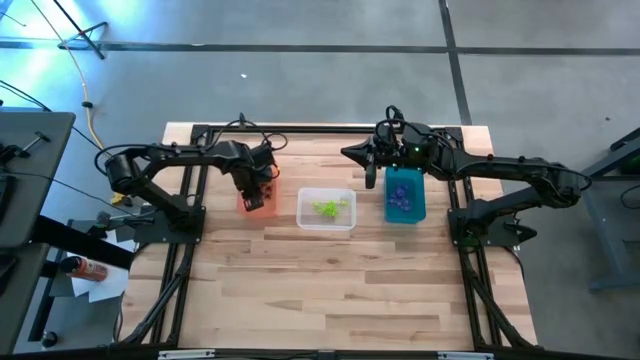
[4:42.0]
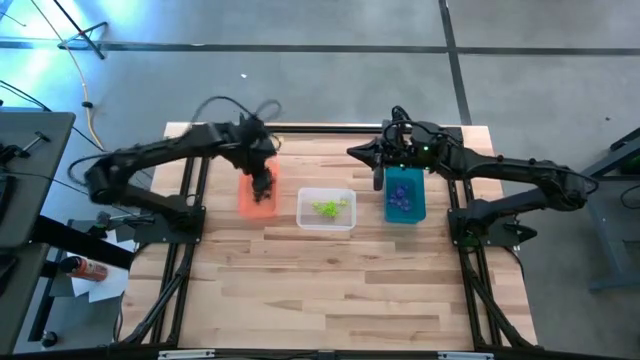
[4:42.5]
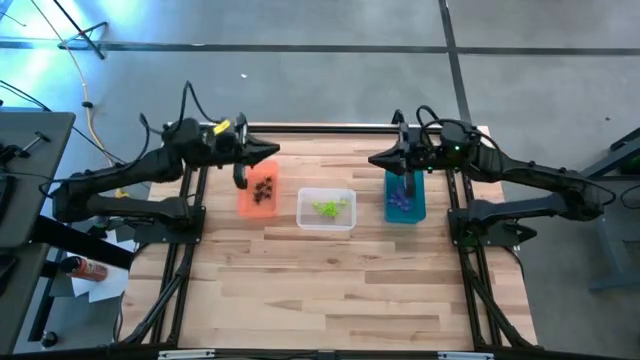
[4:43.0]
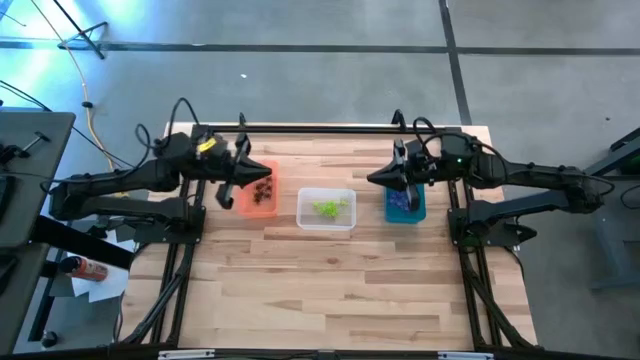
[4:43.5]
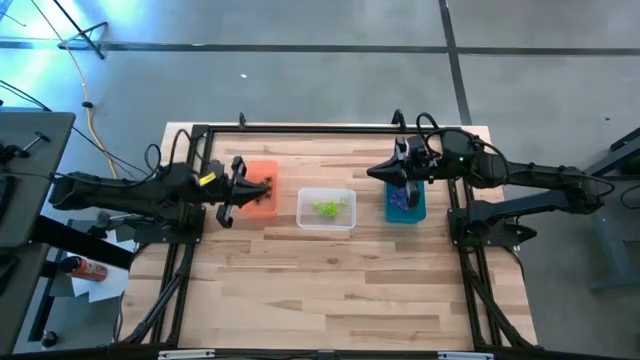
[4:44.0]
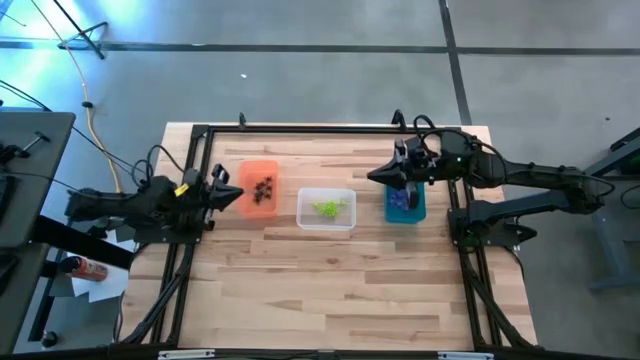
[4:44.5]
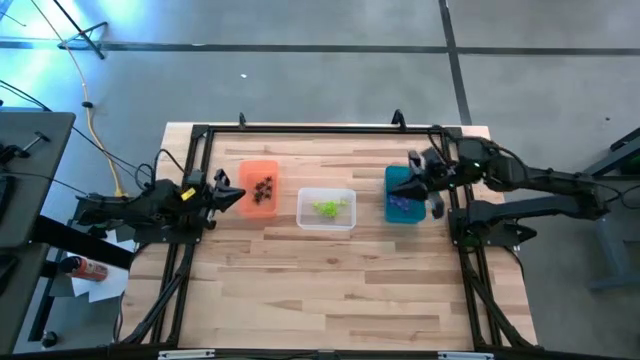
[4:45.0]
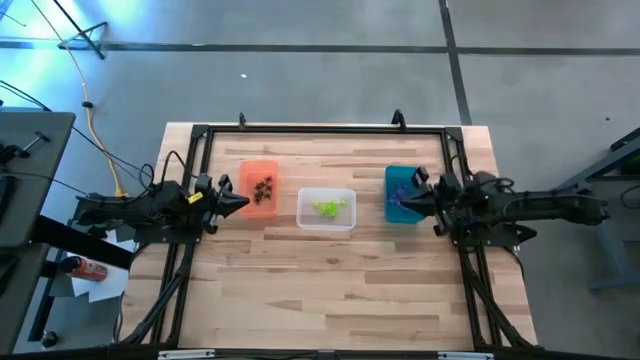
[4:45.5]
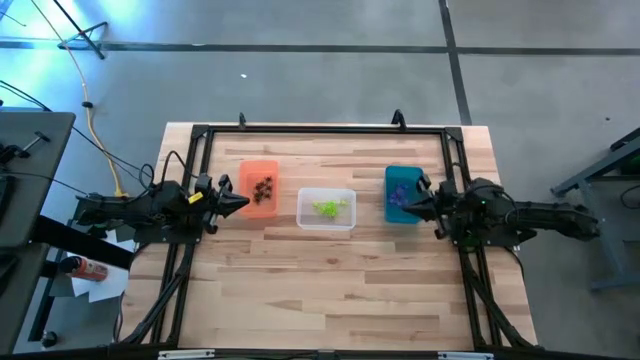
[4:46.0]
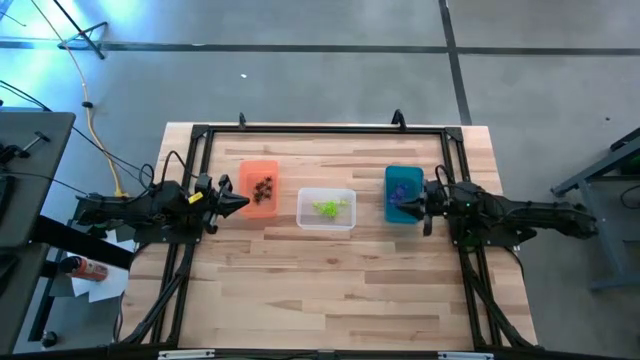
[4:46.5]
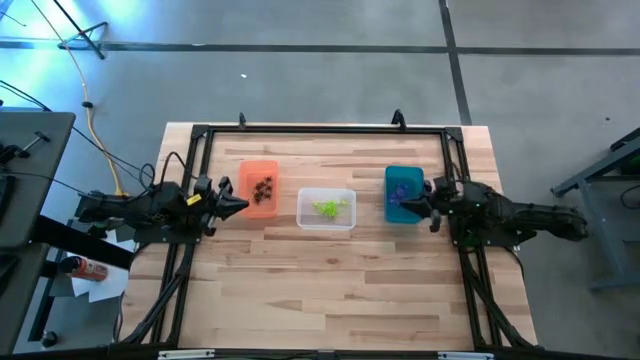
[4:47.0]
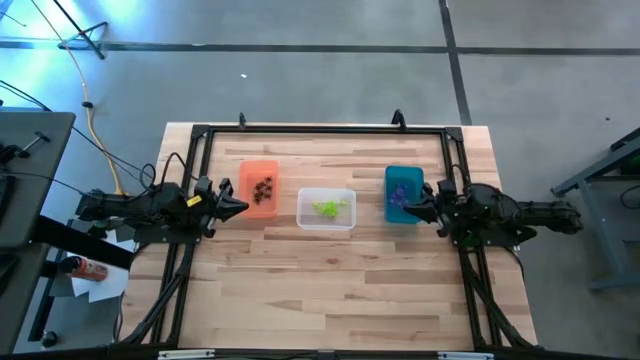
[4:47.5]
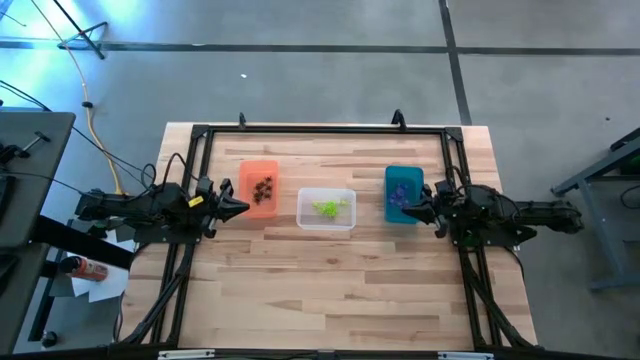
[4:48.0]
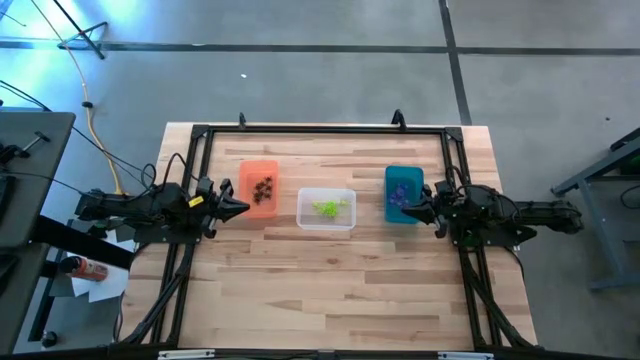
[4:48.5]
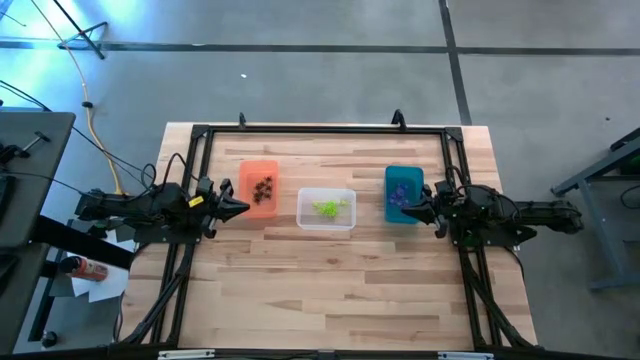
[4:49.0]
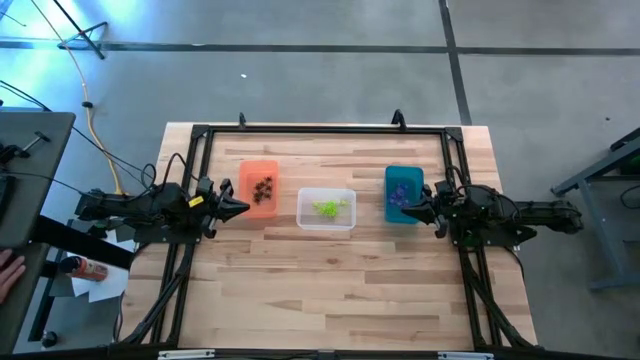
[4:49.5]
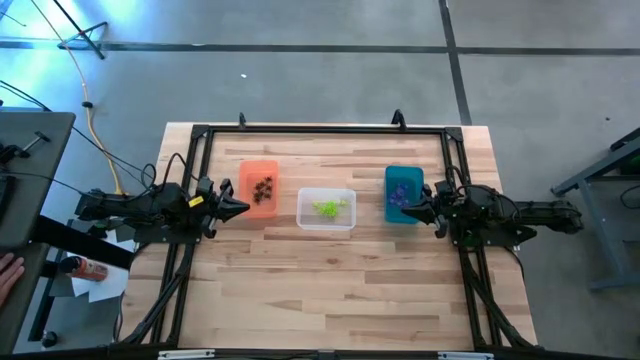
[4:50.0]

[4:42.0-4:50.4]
Task: Sort Halloween decoration
Return to home position

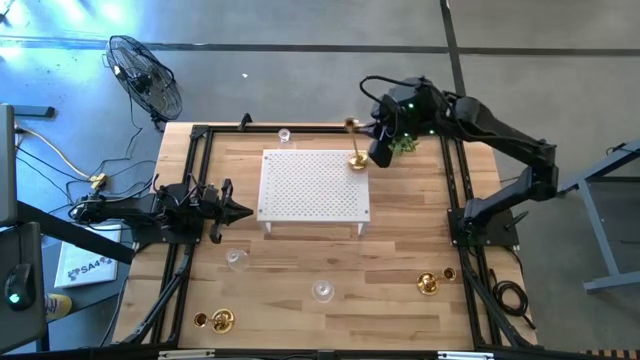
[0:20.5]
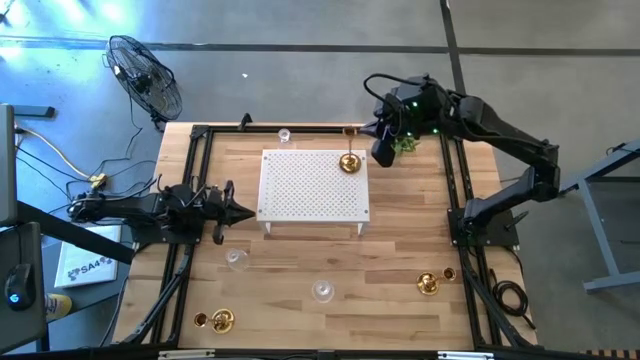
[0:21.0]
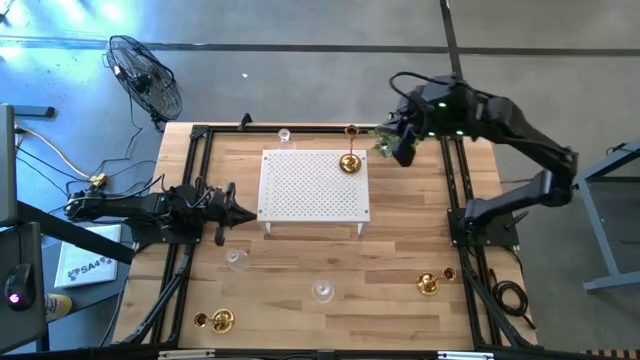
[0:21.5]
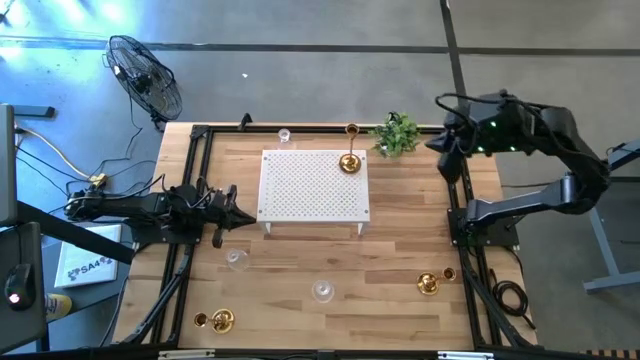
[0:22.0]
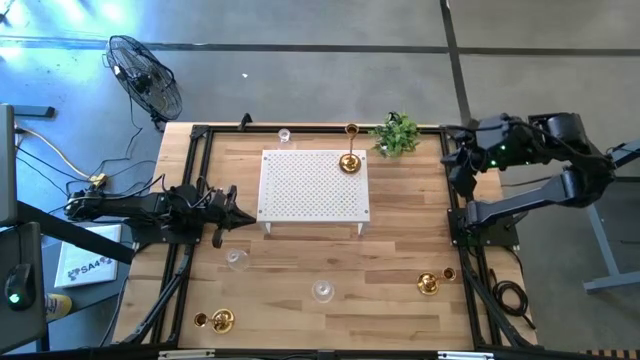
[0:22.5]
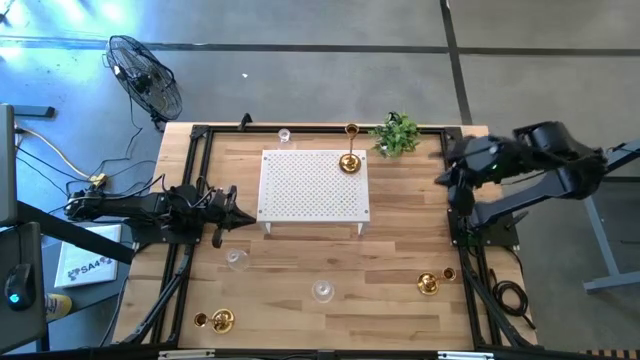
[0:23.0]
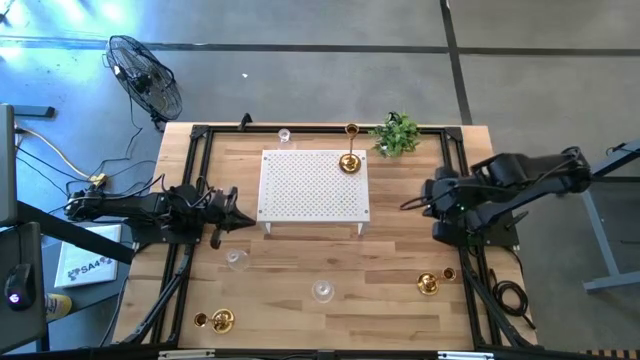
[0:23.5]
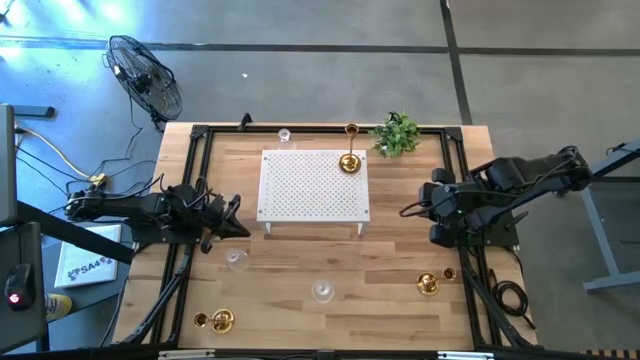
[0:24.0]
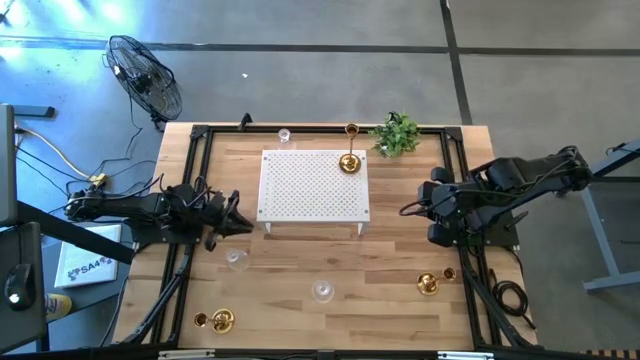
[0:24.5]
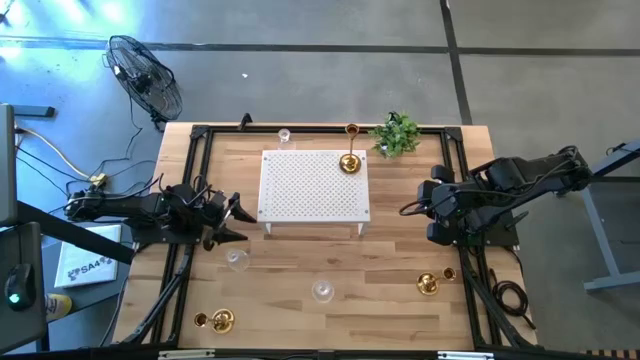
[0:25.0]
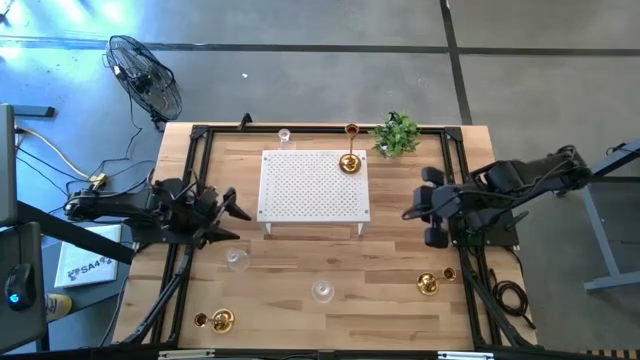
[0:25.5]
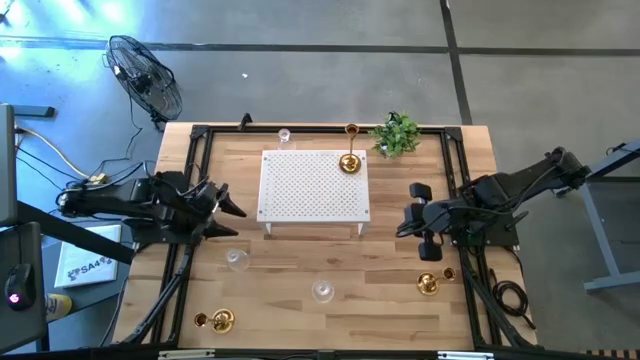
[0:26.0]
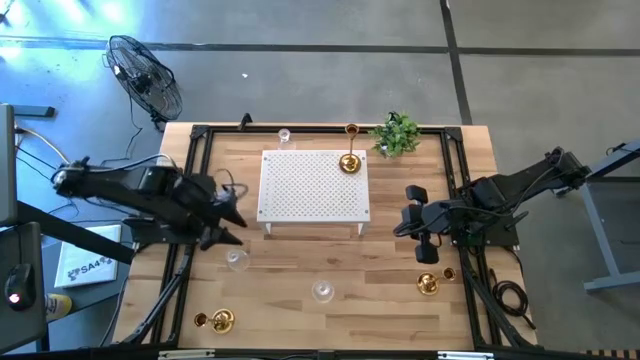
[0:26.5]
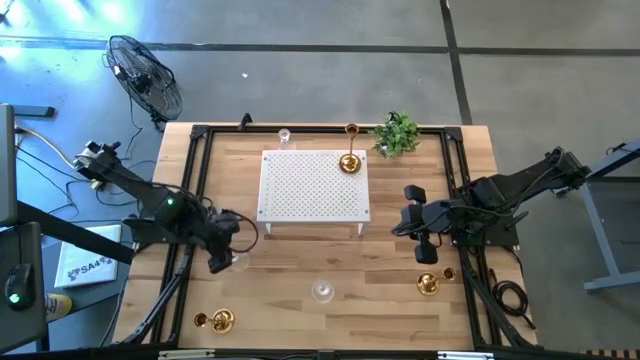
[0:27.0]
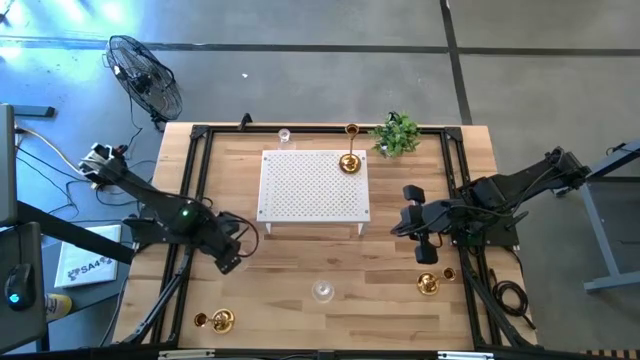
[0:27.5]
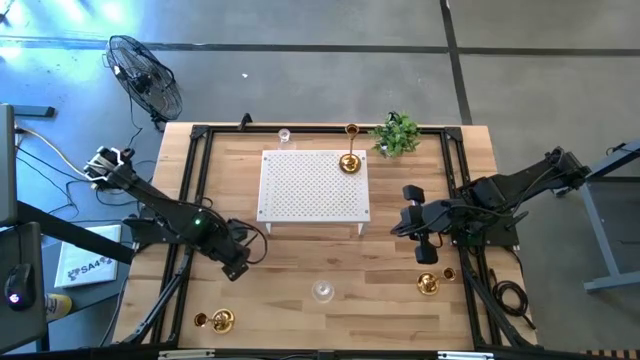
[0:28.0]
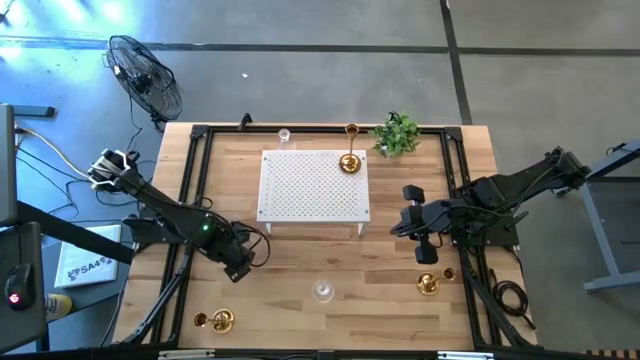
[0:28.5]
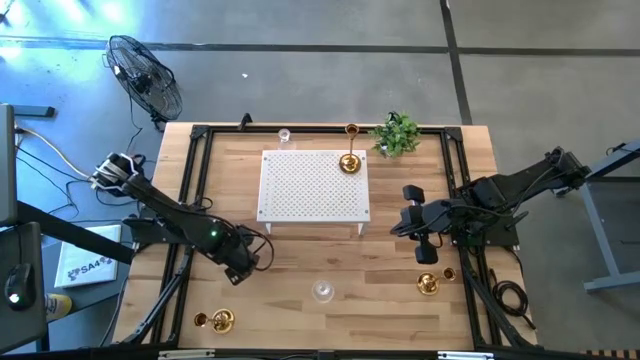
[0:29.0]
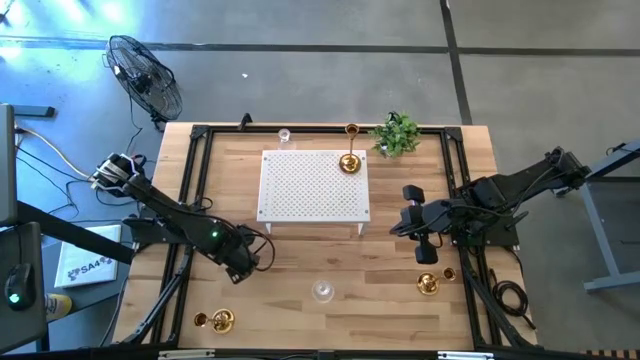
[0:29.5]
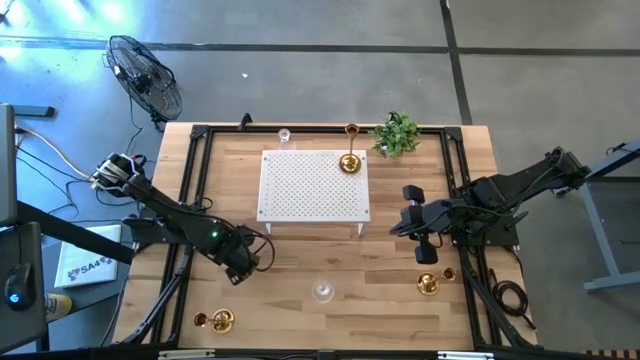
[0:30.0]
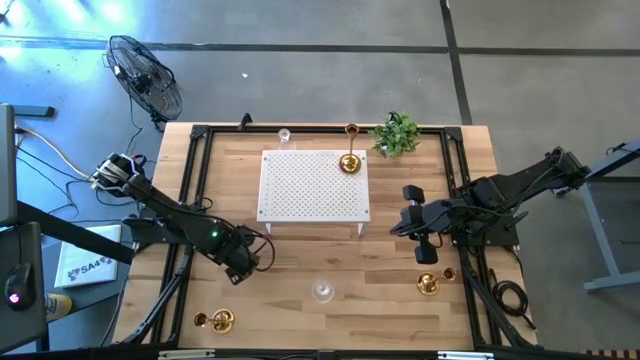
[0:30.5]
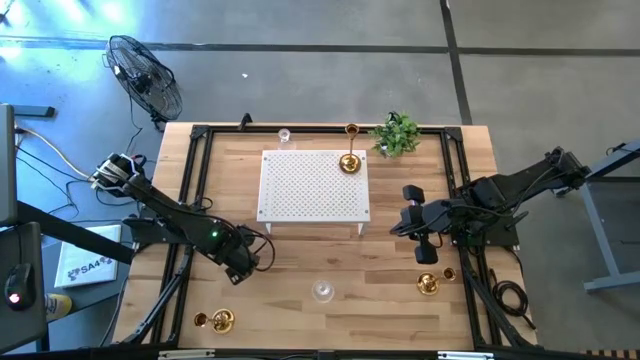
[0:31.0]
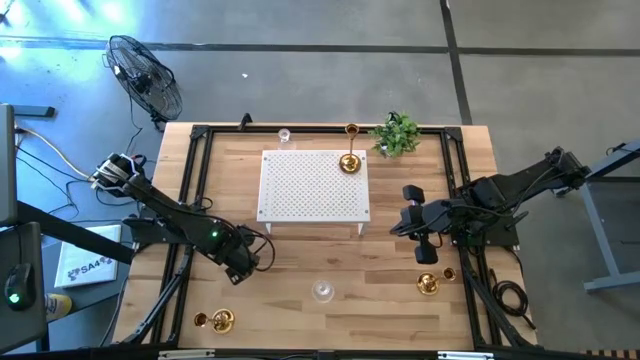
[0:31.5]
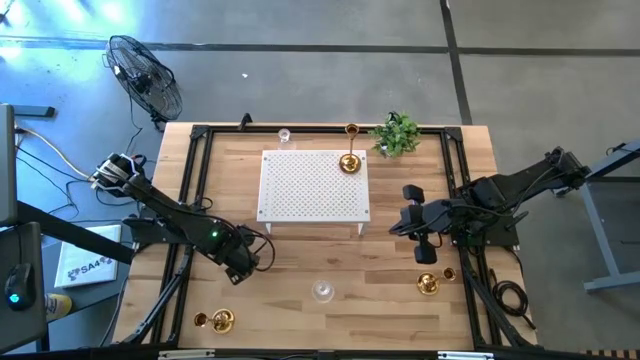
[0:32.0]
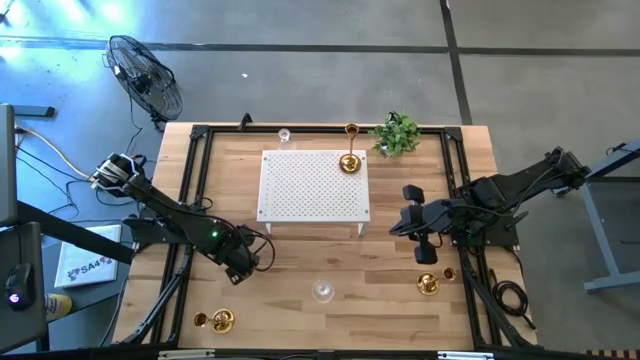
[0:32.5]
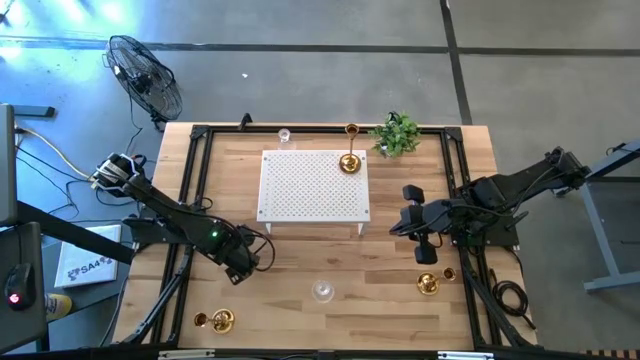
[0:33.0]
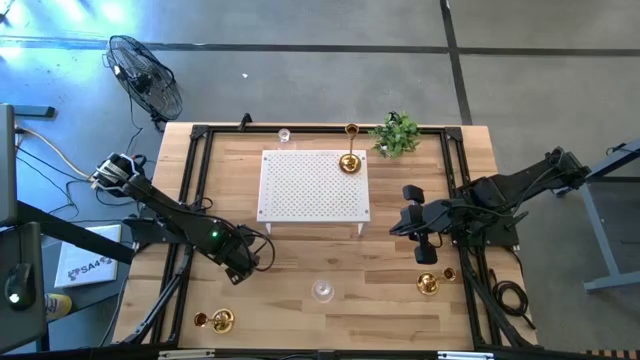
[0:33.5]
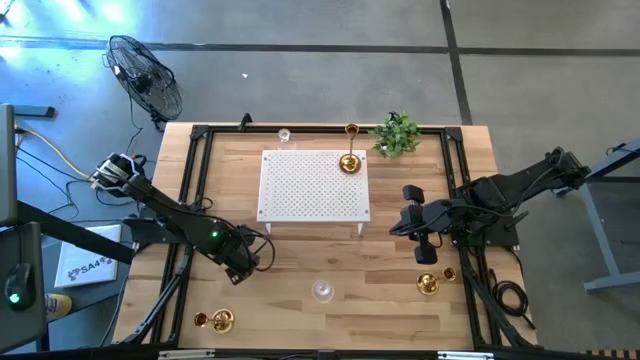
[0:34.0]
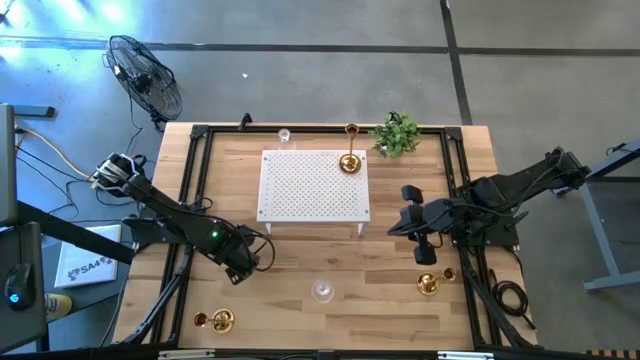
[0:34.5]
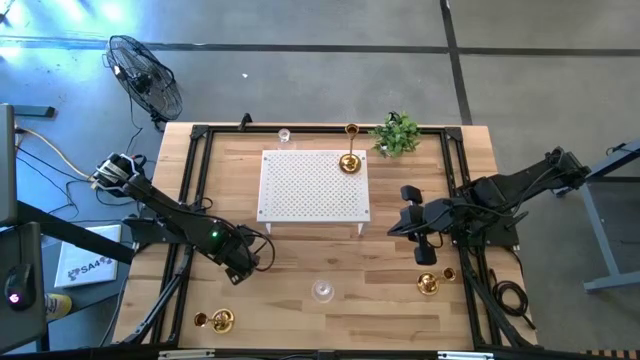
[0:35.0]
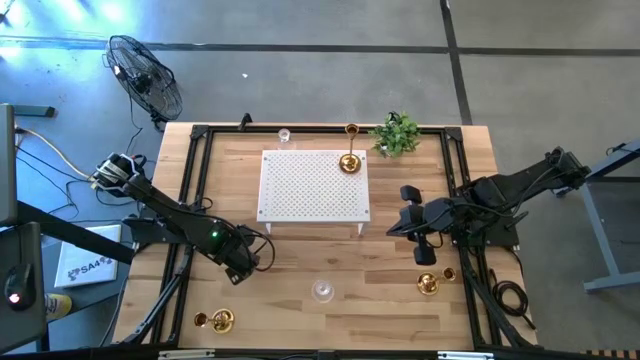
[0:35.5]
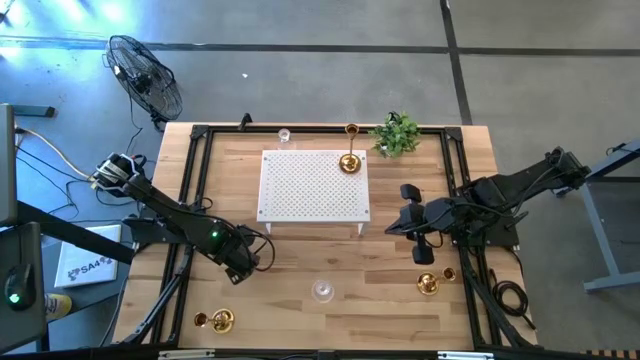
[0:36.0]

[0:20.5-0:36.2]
Task: Pick & Place candle stick holders
Put the middle left transparent glass candle holder on the shelf
